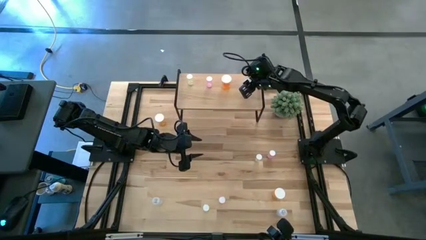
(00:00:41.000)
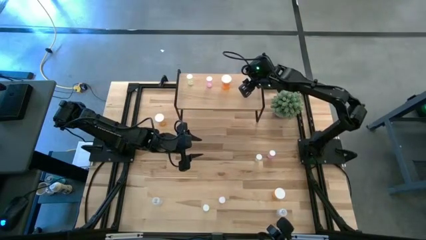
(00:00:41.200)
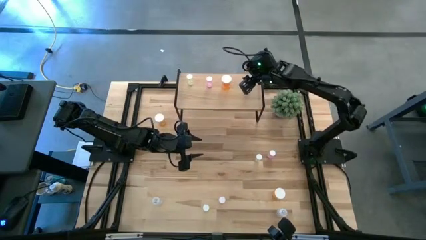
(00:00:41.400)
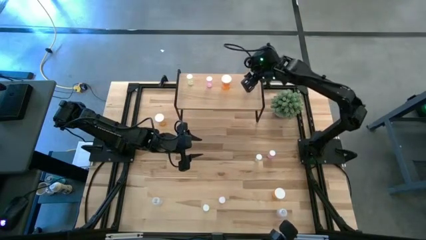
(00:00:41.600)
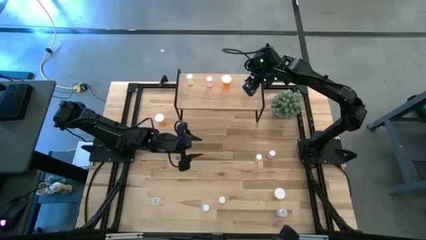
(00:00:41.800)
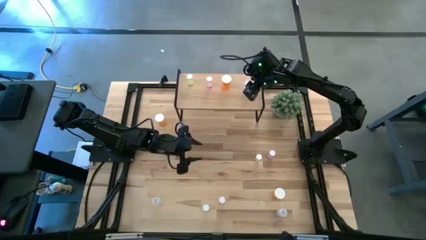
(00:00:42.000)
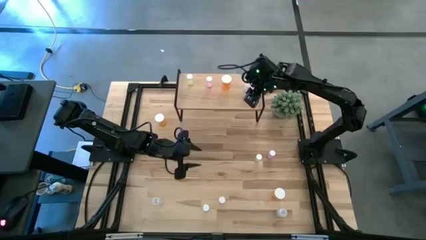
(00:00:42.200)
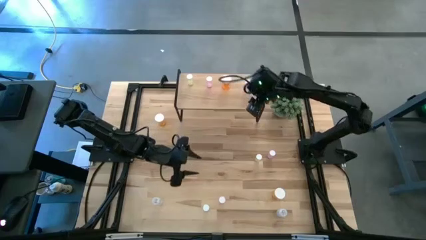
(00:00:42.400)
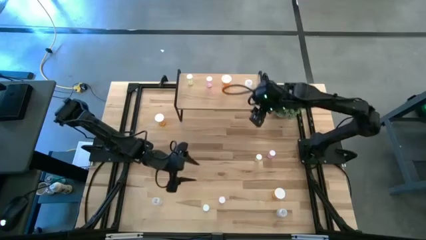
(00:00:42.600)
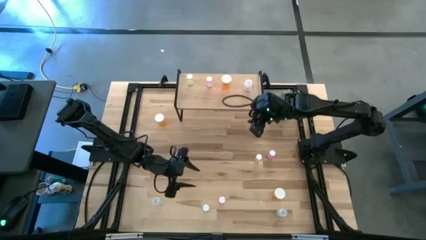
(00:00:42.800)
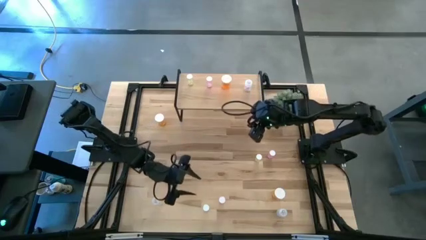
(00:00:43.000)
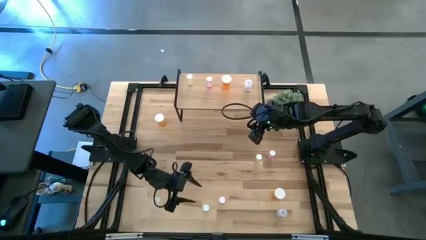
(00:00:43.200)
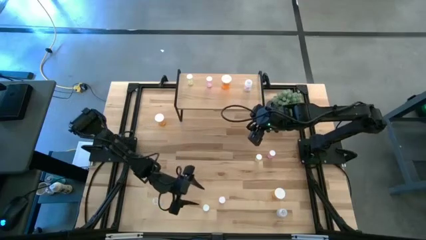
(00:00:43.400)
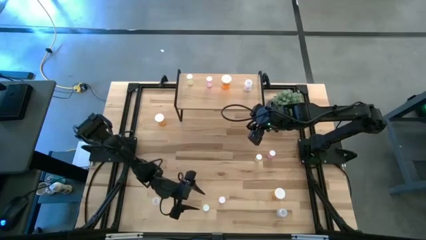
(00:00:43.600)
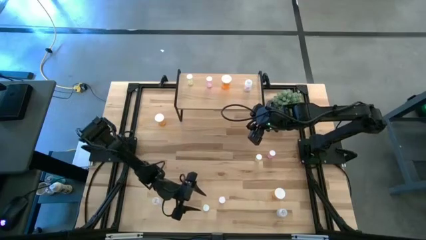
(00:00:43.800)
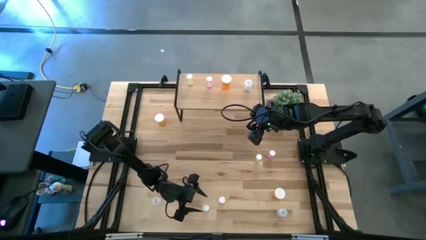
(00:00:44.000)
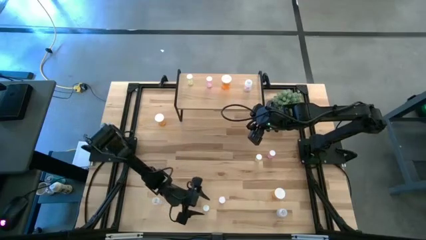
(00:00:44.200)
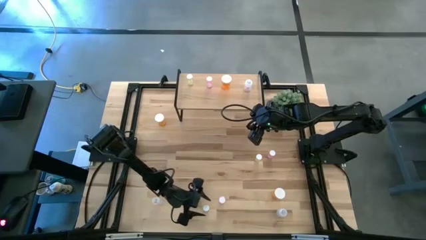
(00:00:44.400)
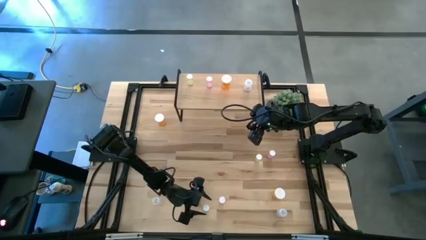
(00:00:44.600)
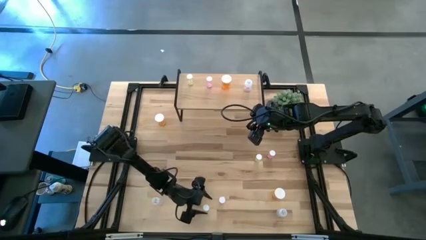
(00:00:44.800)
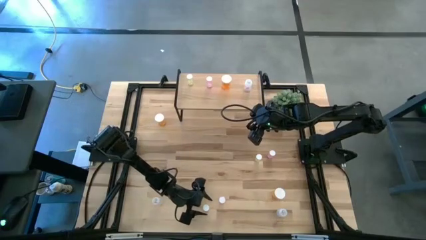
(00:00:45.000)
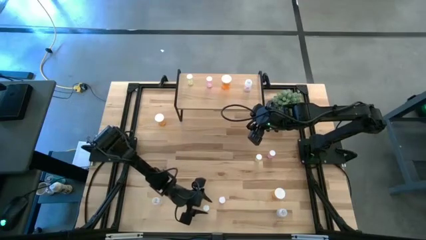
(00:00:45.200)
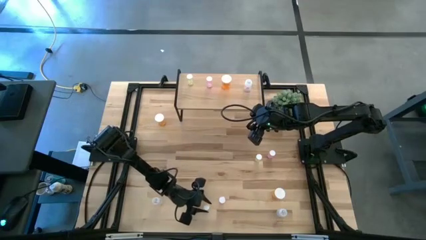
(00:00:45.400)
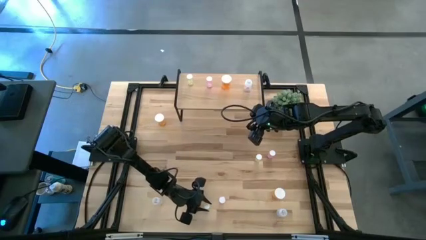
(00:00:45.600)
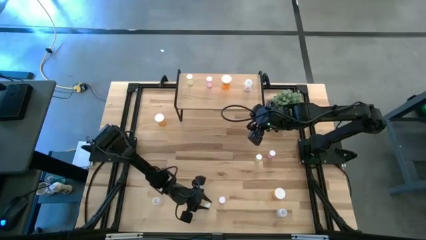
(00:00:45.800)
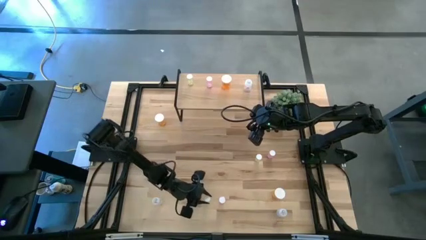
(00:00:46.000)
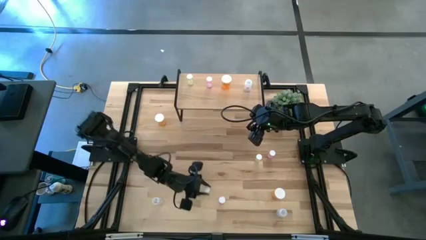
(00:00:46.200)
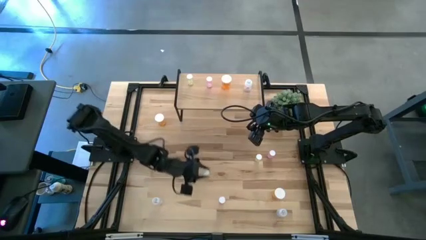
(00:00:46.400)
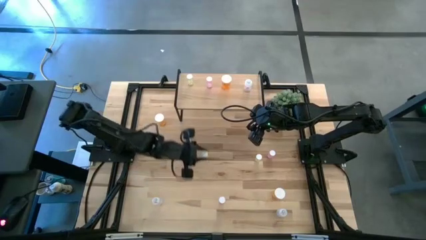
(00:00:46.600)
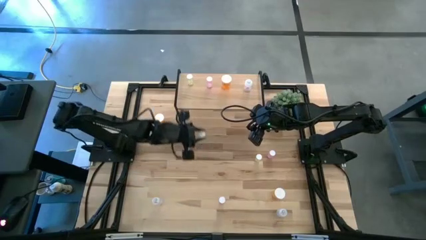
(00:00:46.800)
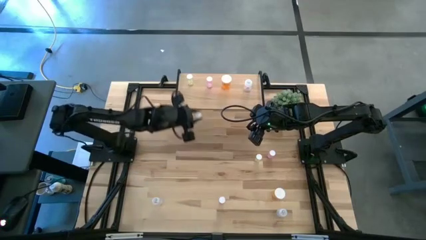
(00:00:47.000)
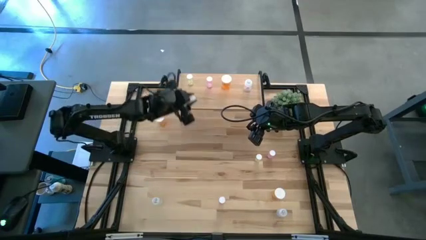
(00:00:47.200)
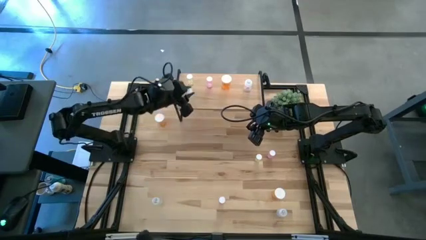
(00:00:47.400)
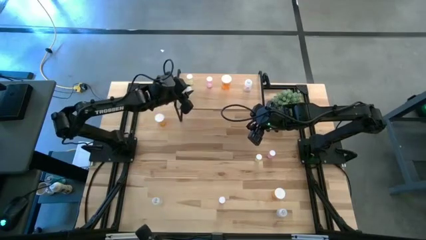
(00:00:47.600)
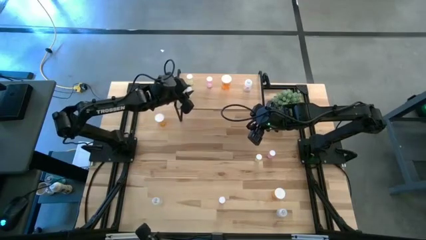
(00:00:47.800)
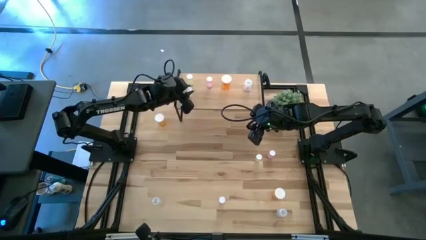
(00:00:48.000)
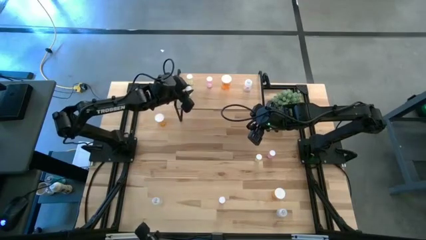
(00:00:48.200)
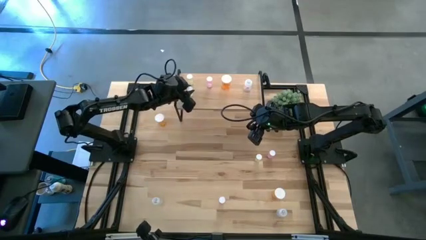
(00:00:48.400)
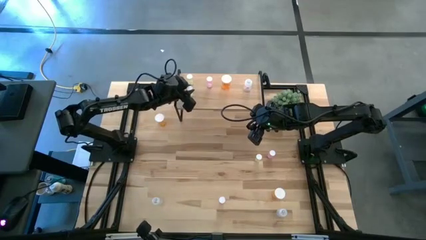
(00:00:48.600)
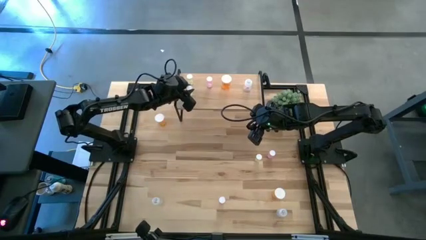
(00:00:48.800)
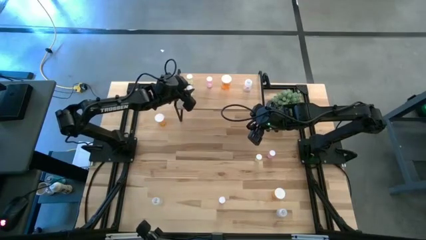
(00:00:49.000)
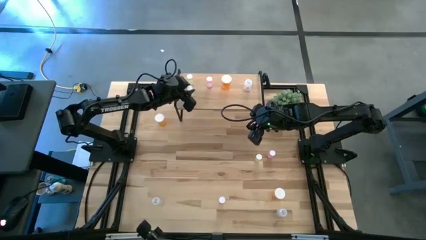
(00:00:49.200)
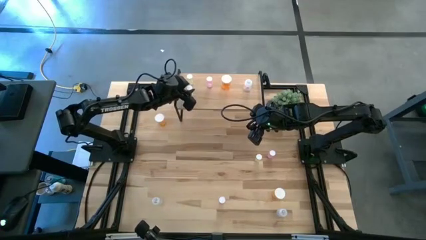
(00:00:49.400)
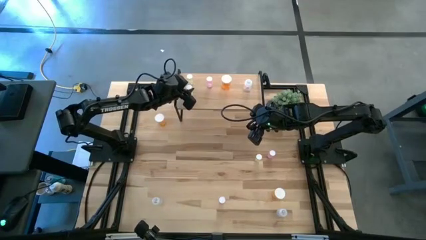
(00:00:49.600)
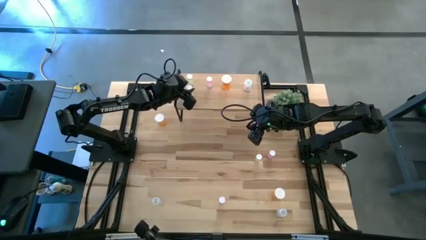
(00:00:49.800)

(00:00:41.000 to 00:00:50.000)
Task: Pick and place medicine bottles onto shelf by color
Put the bottom green pill bottle aligned with the other green pill bottle on the shelf

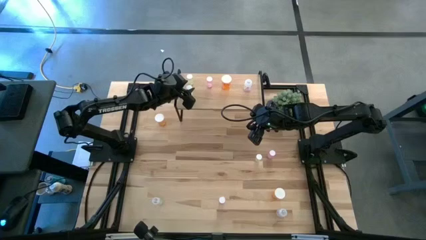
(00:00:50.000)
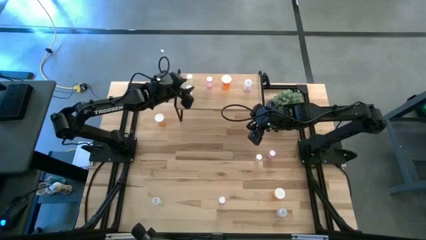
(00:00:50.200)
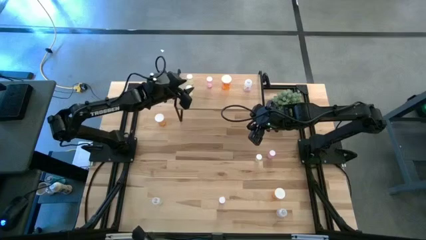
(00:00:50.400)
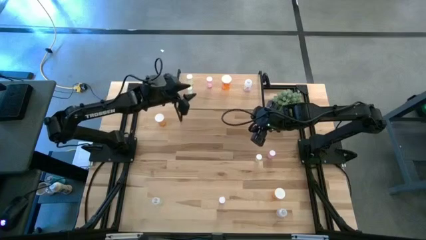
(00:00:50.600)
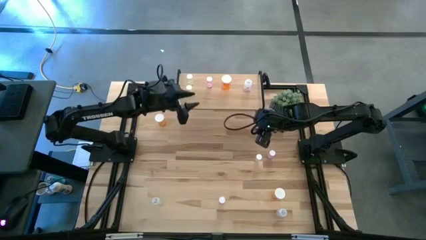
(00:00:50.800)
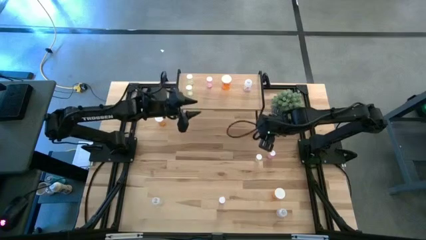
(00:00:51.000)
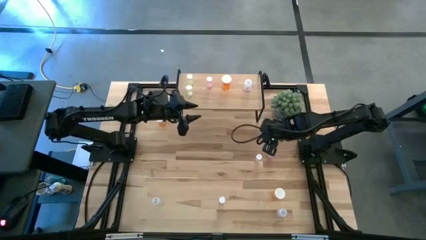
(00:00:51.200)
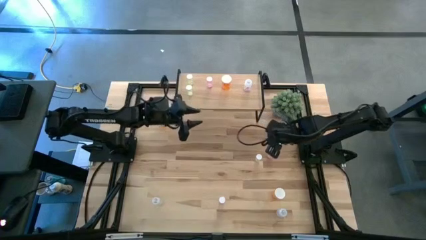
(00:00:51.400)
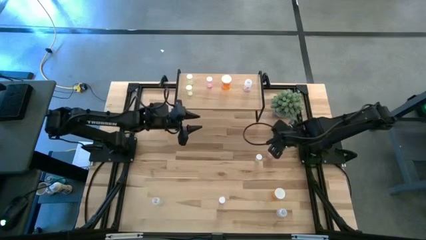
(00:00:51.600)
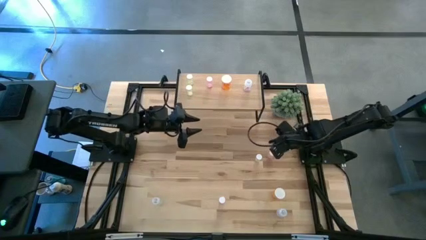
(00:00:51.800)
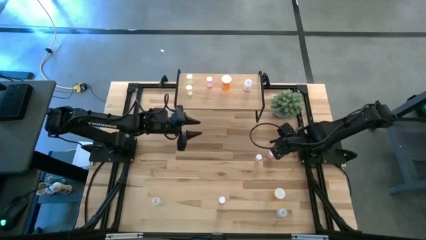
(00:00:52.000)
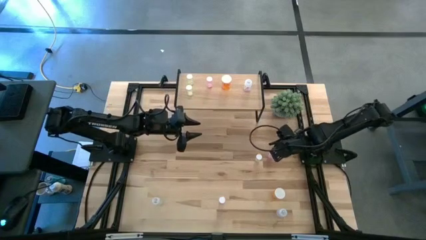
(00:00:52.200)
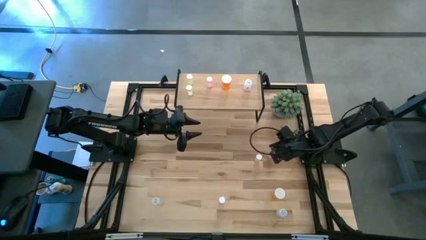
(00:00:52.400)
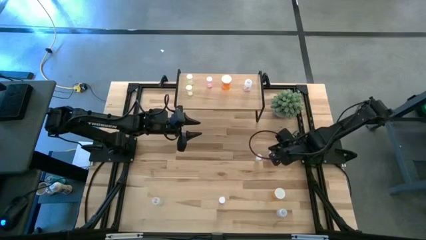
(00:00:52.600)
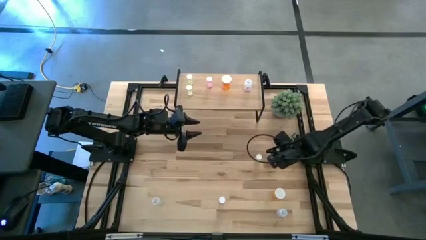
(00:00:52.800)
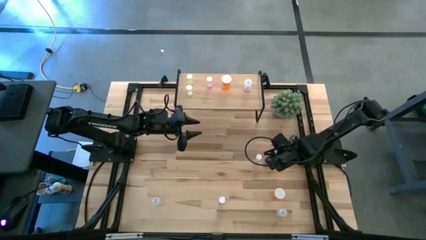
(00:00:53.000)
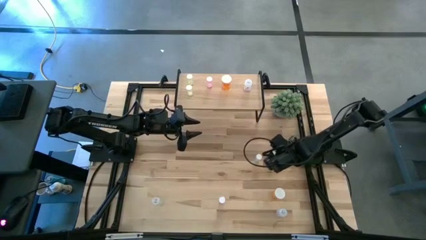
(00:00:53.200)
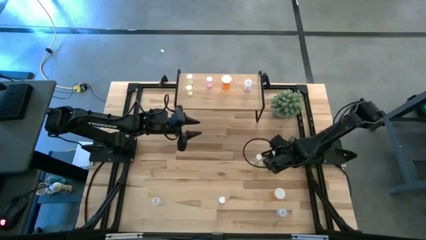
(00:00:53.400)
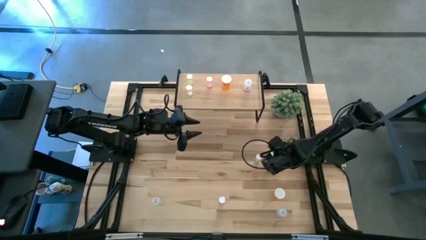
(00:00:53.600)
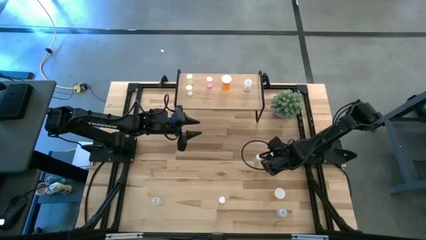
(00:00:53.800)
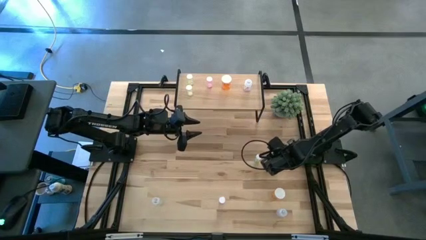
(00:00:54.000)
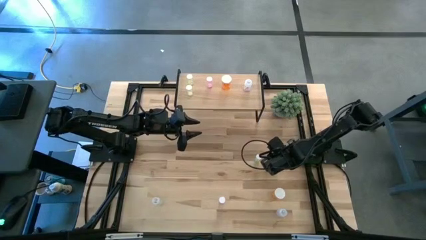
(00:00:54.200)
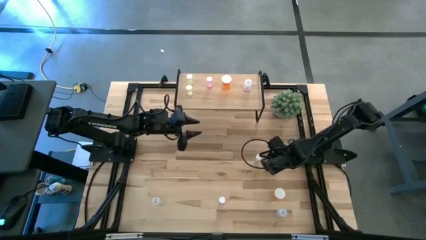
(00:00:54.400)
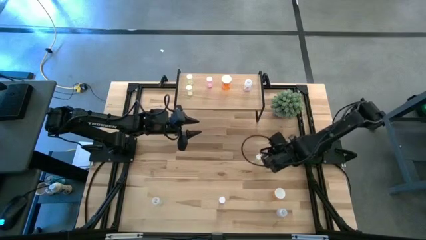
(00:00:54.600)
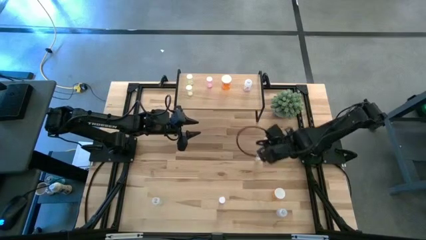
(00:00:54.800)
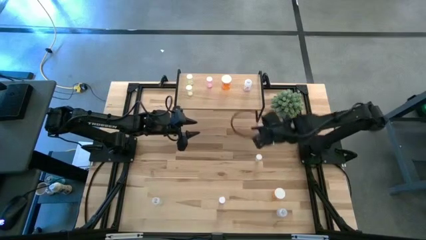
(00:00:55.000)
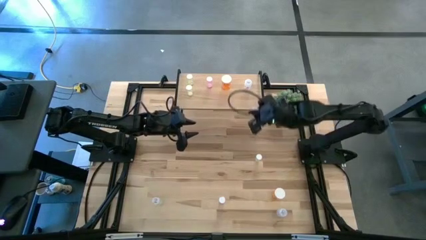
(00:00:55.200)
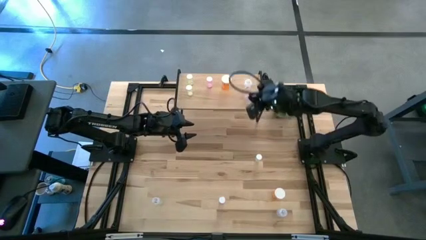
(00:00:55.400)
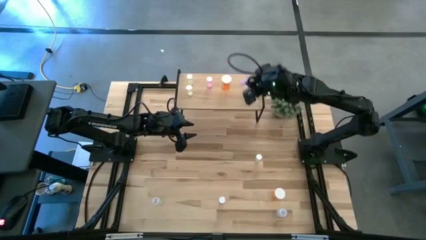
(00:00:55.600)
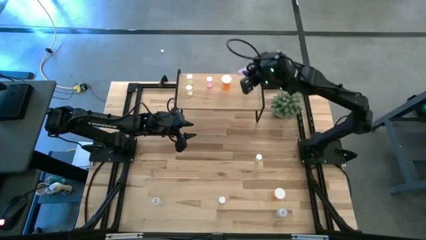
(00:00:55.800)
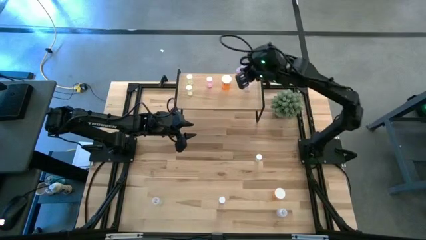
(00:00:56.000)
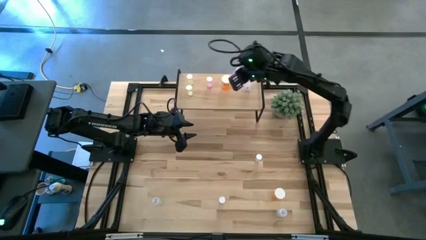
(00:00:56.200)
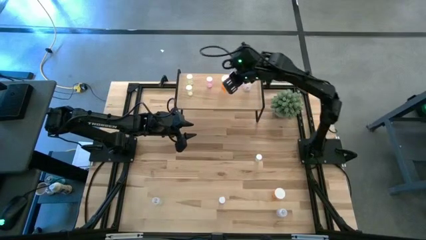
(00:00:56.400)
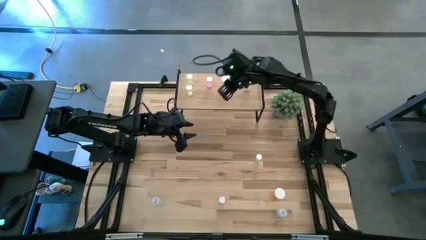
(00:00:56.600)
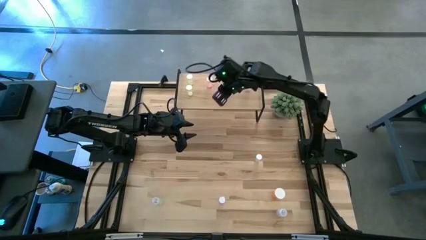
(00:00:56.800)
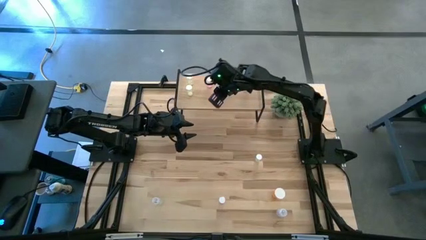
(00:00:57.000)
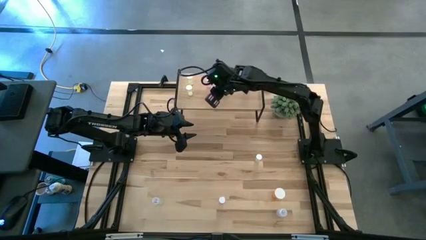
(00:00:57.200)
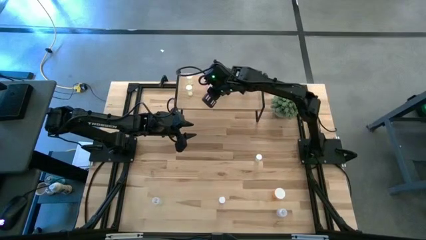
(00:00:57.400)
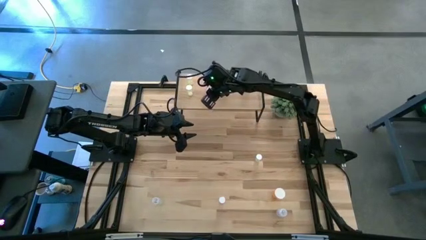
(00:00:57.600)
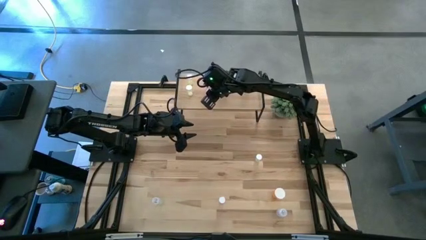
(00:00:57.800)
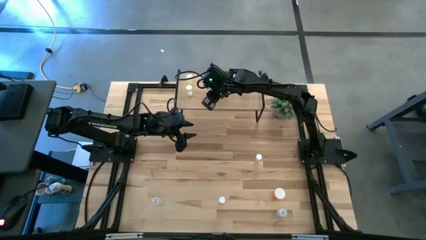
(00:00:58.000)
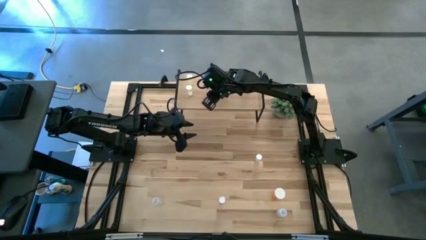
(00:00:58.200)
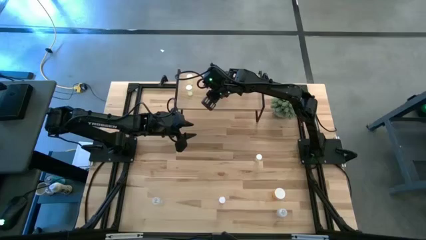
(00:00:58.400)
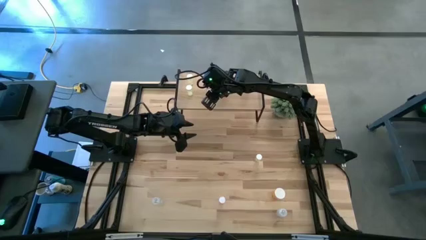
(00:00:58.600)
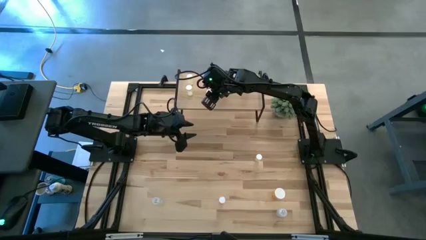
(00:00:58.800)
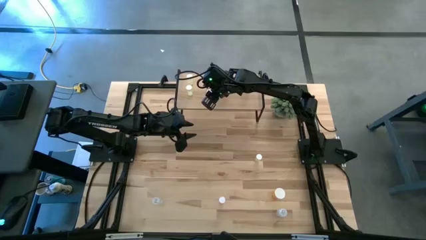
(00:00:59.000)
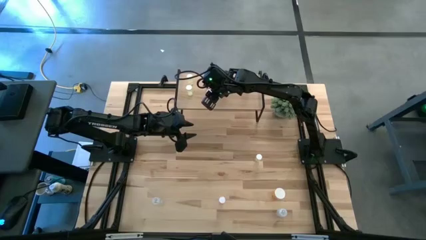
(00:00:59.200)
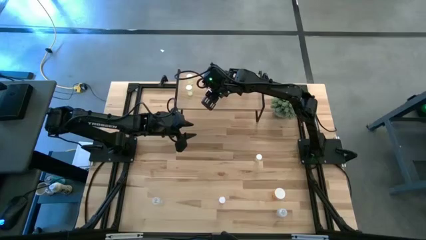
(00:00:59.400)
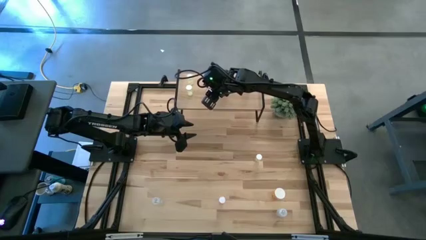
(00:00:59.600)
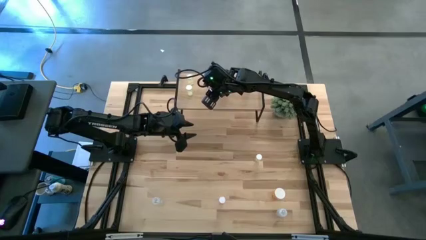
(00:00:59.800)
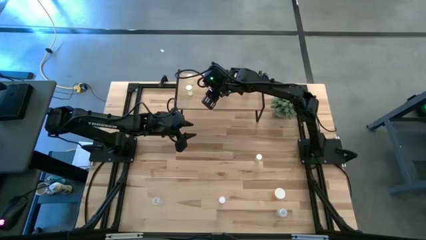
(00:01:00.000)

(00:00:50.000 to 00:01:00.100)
Put the top pink pill bottle aligned with the other pink pill bottle on the shelf
